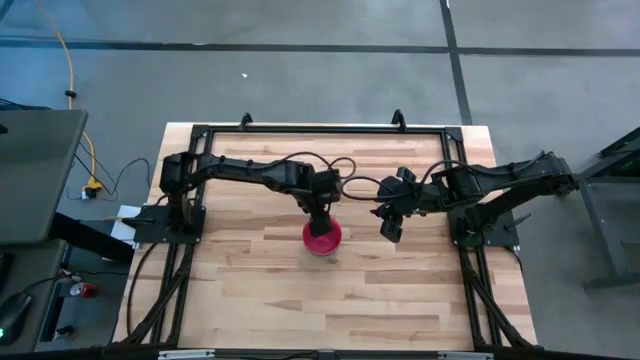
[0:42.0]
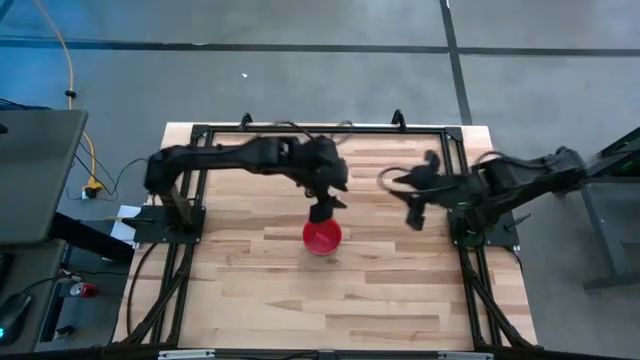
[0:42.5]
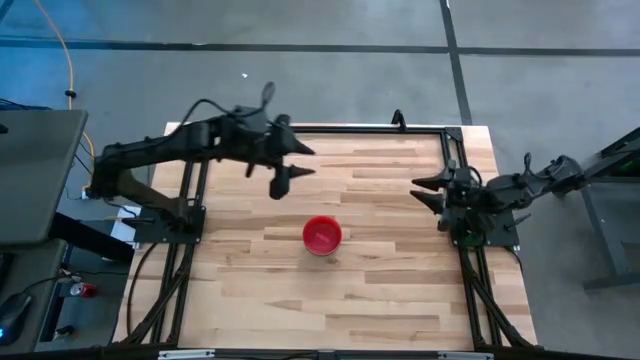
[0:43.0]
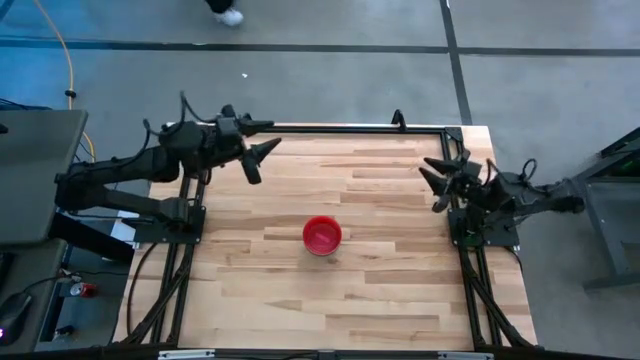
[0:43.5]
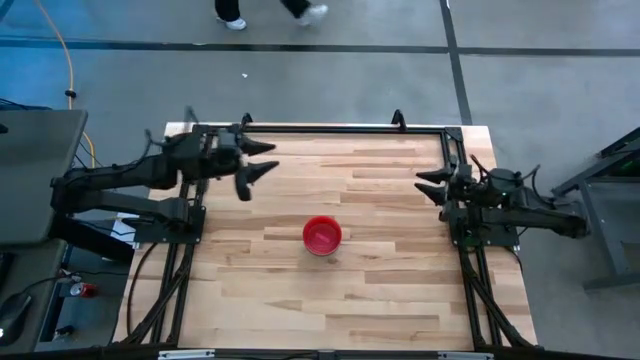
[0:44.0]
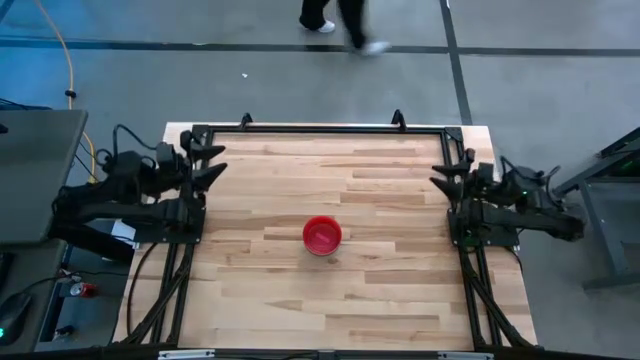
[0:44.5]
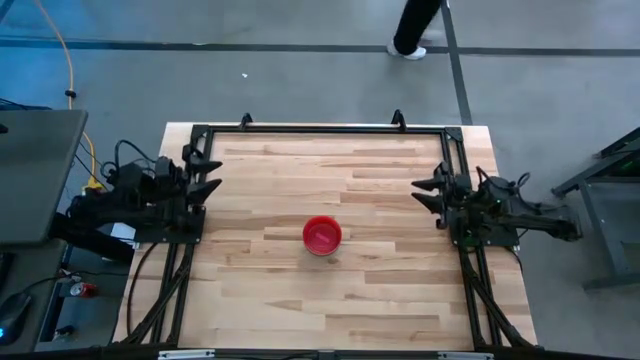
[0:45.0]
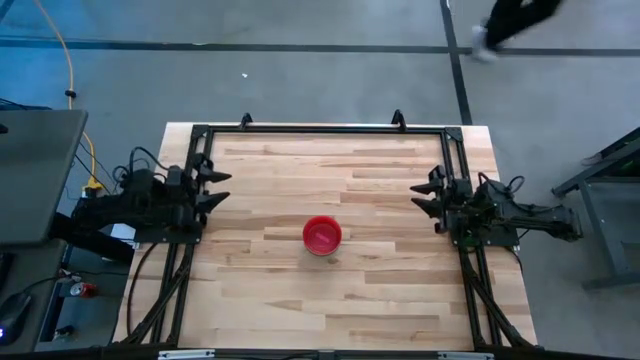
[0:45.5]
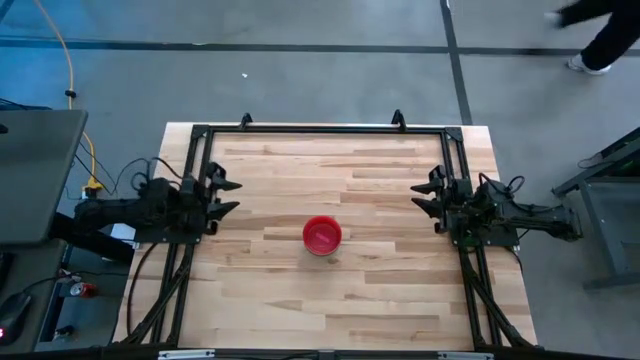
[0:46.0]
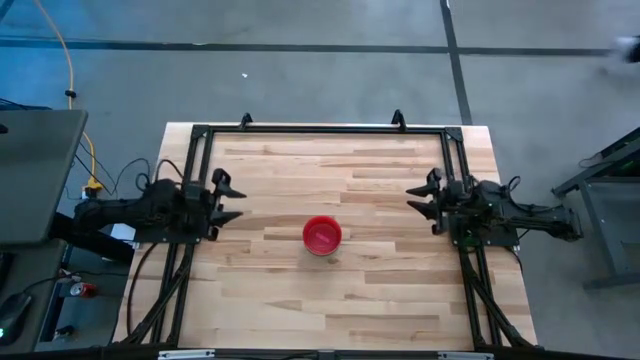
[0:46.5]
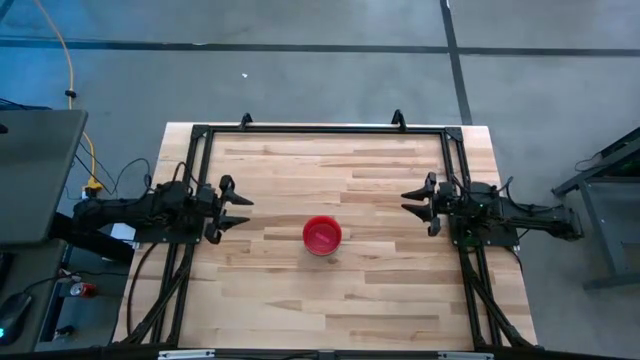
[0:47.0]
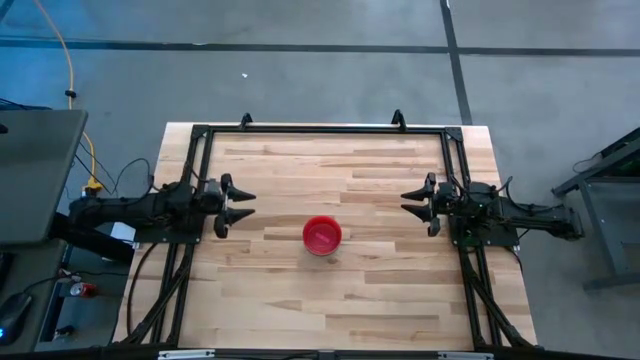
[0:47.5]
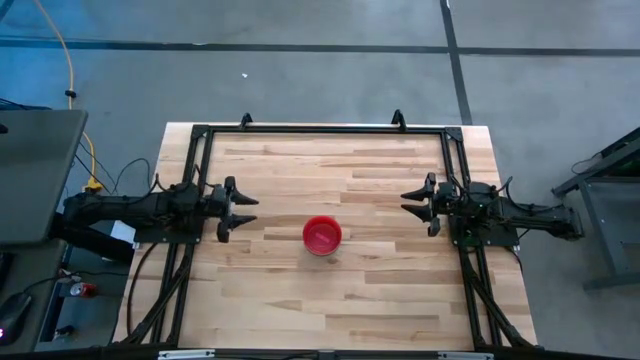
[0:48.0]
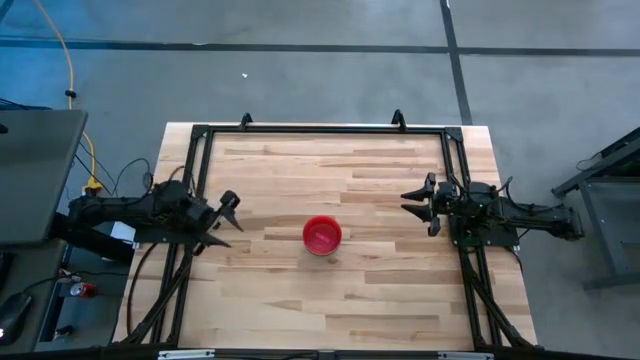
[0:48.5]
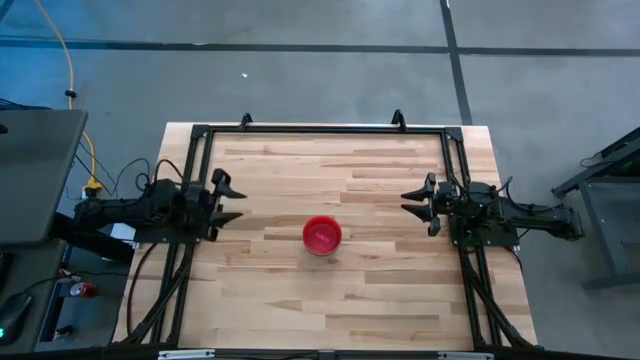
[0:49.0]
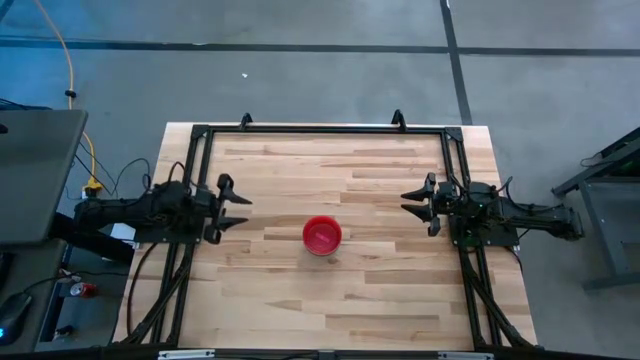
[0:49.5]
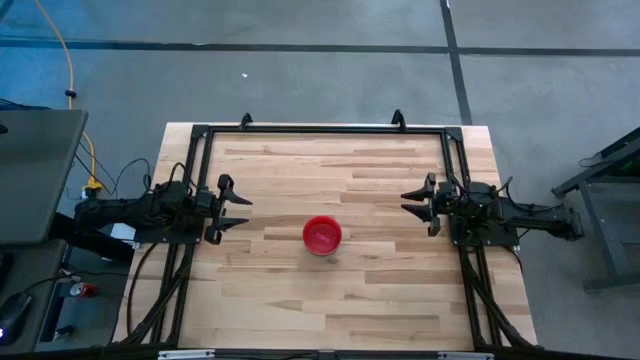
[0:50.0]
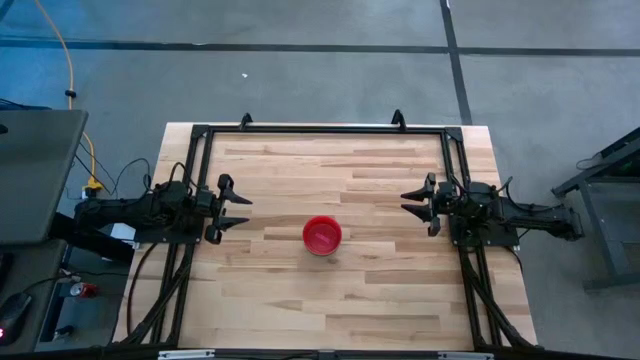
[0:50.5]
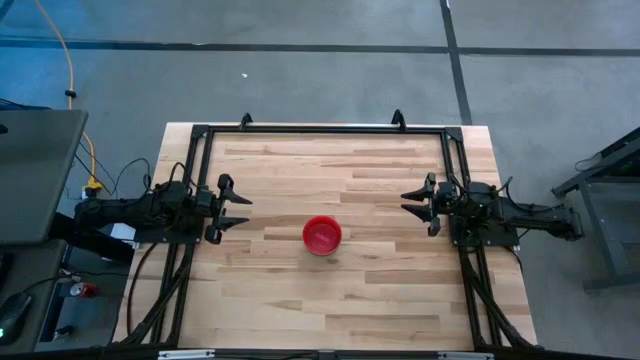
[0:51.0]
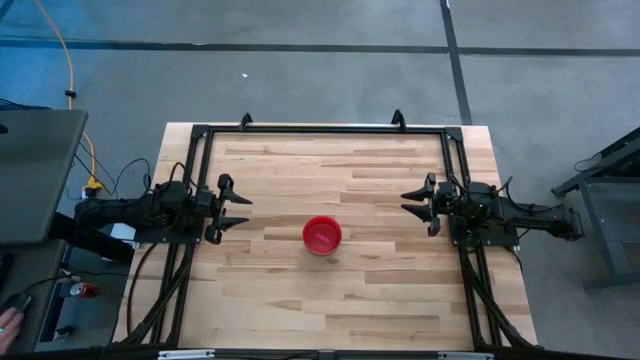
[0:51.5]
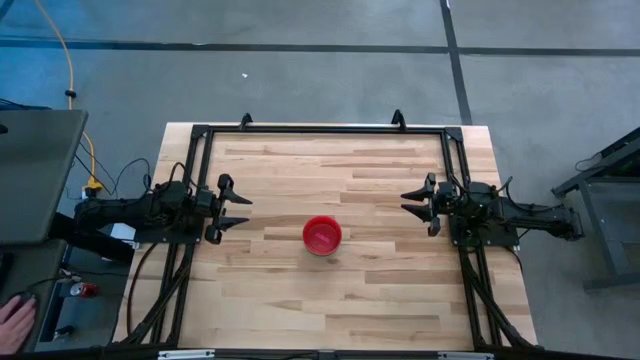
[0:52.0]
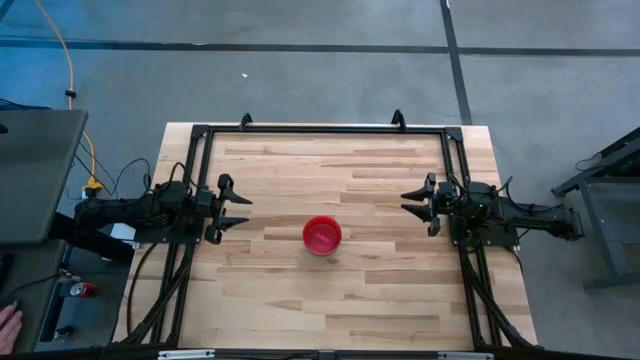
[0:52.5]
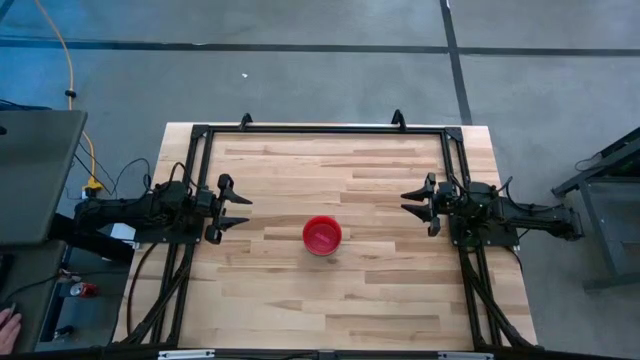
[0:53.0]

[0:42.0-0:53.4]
Task: Nest bowls inside each other
Return to Home Position

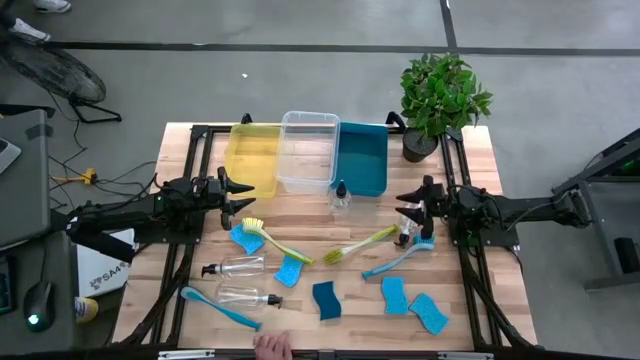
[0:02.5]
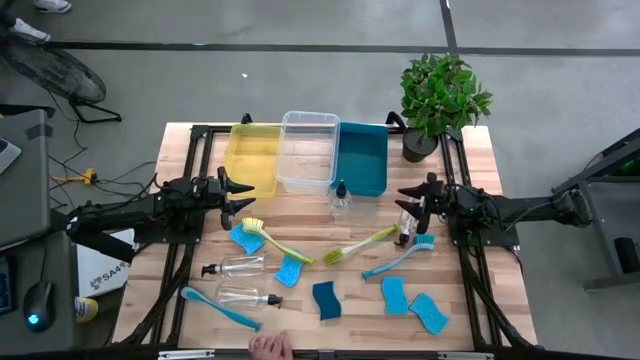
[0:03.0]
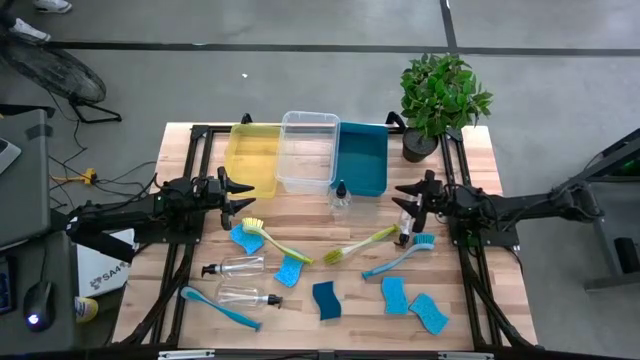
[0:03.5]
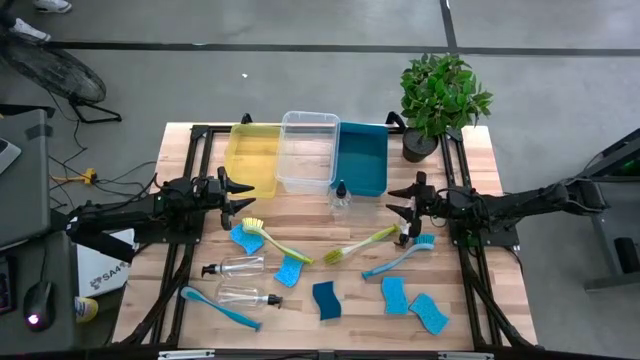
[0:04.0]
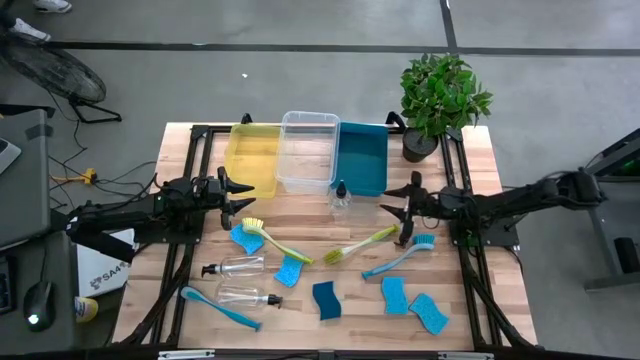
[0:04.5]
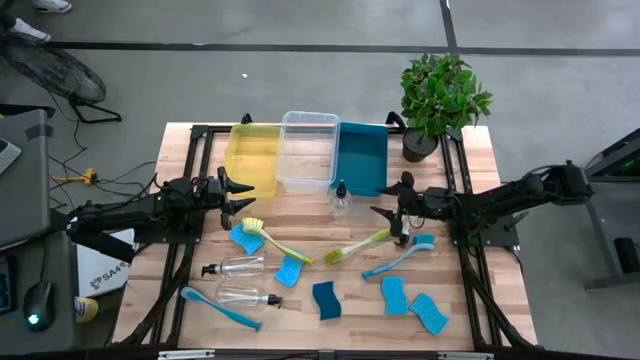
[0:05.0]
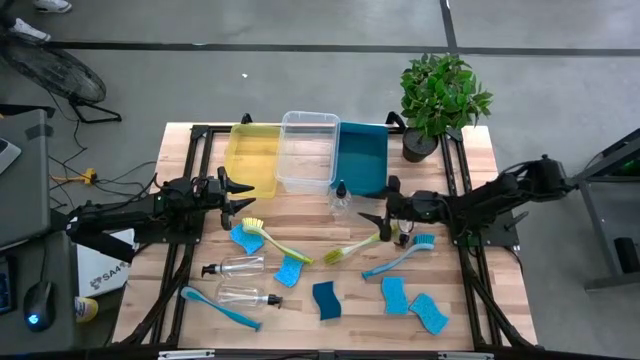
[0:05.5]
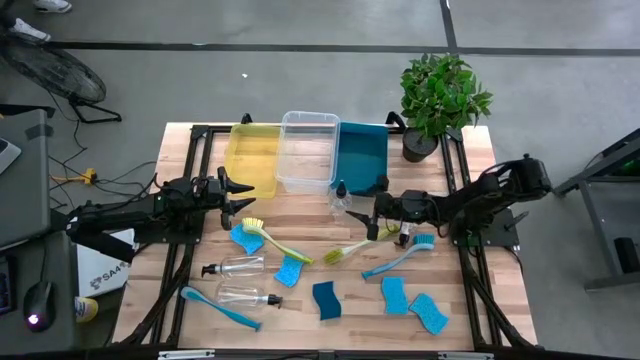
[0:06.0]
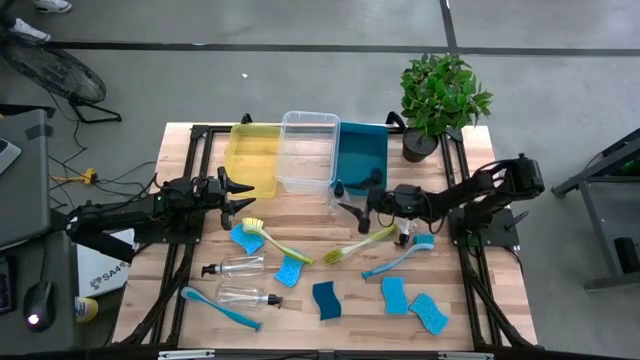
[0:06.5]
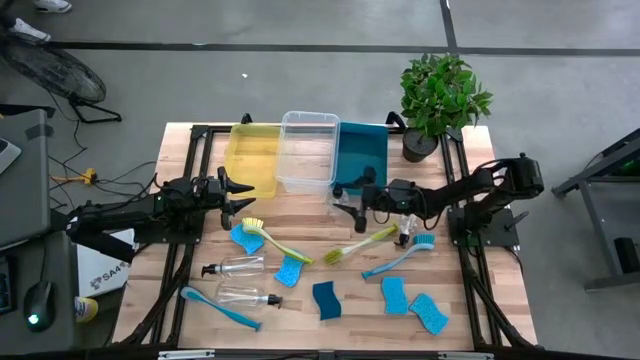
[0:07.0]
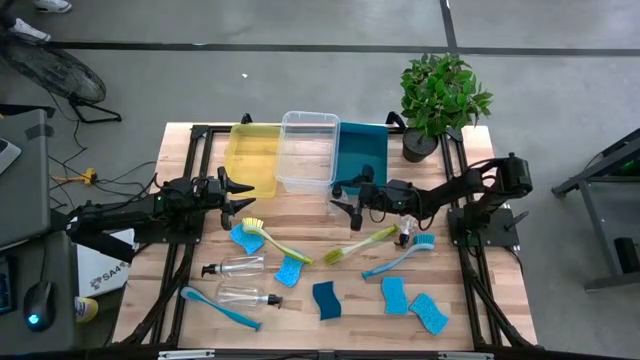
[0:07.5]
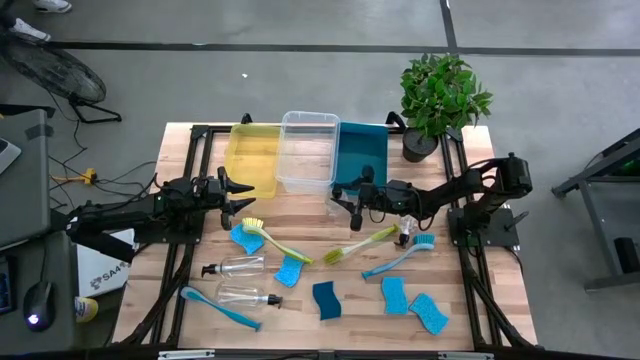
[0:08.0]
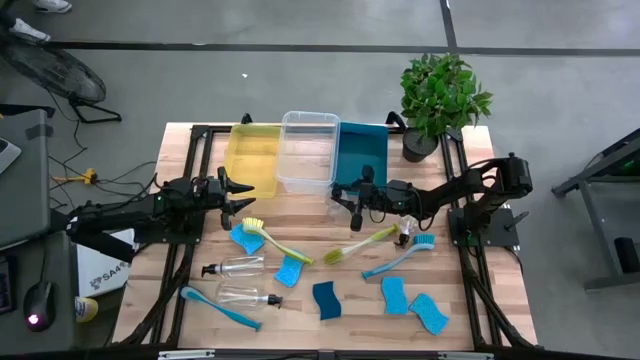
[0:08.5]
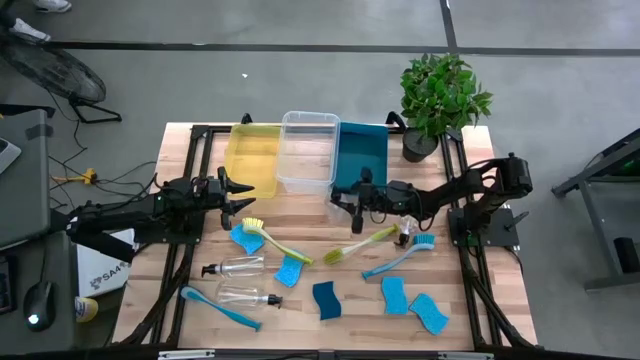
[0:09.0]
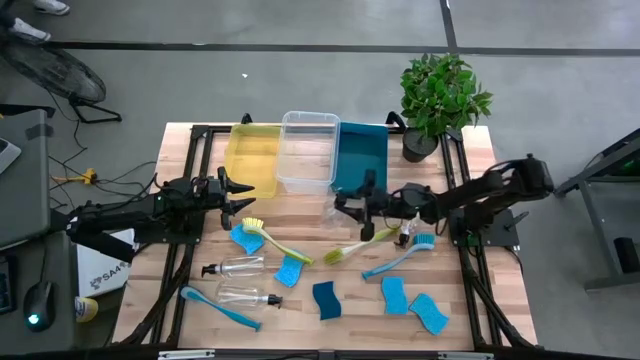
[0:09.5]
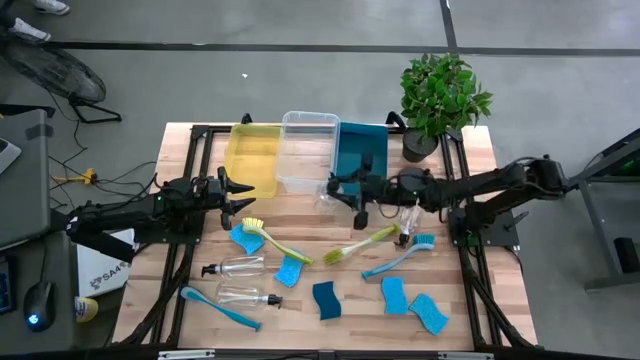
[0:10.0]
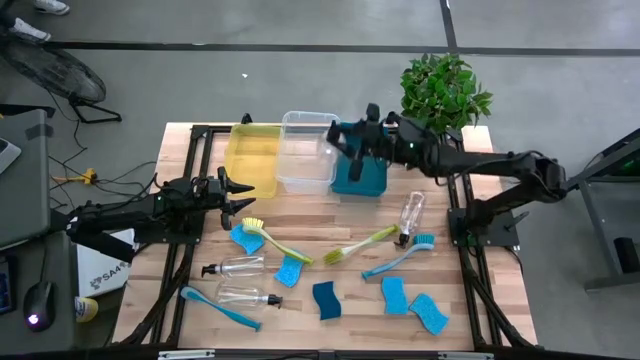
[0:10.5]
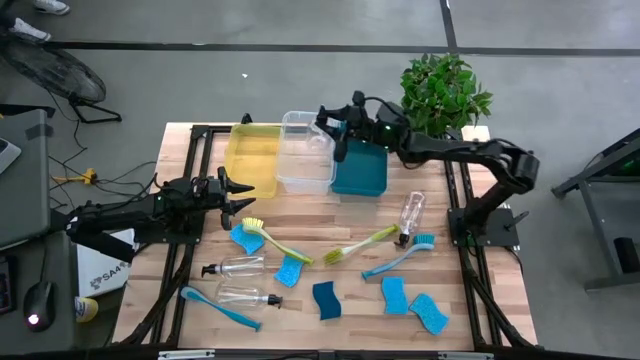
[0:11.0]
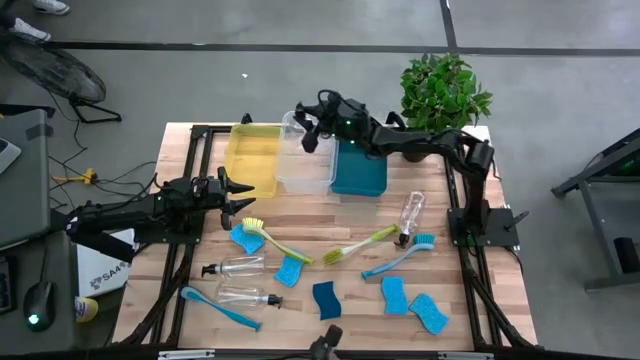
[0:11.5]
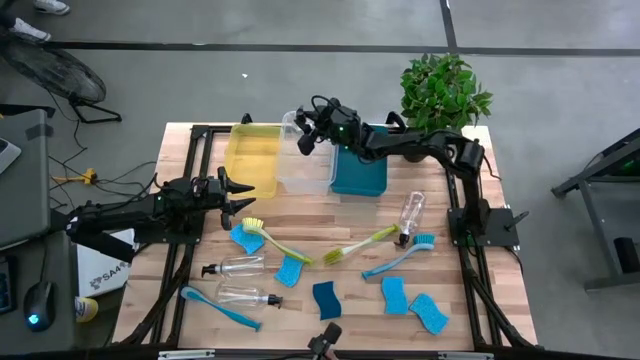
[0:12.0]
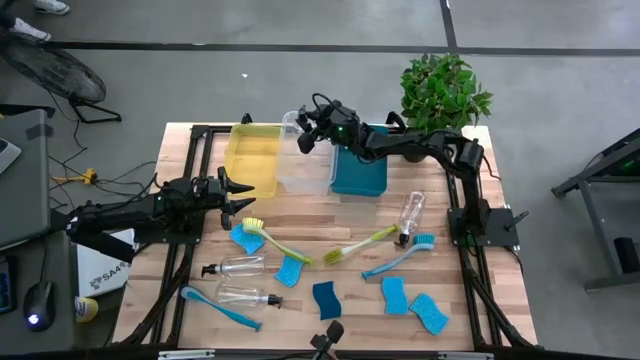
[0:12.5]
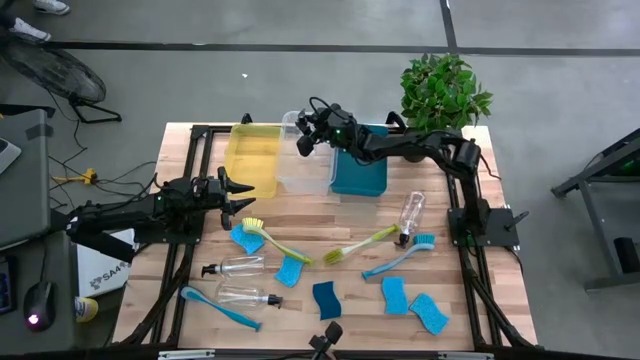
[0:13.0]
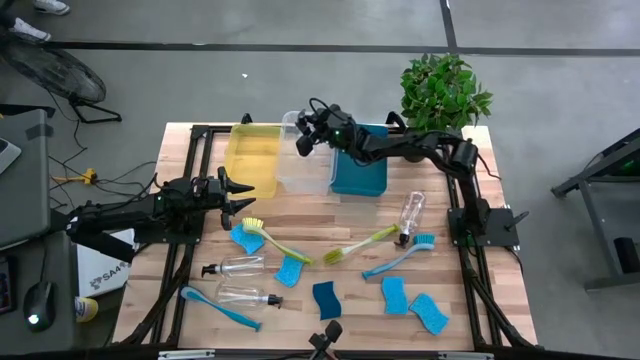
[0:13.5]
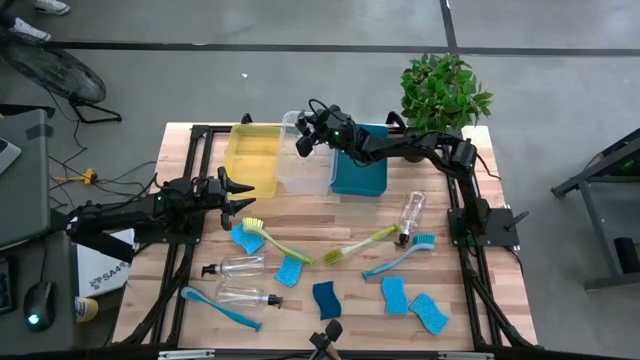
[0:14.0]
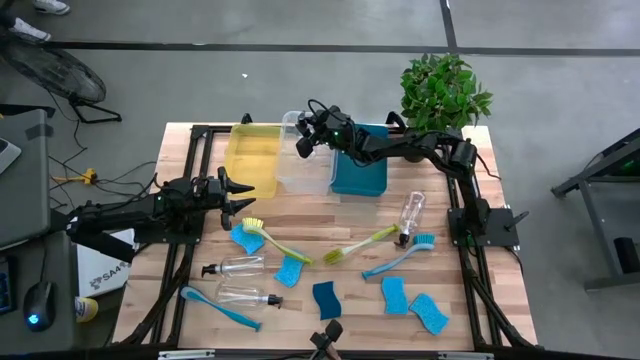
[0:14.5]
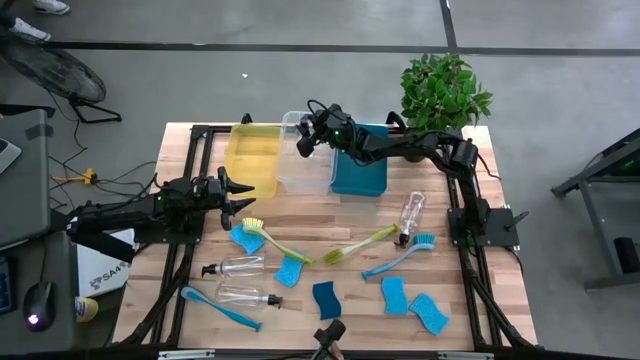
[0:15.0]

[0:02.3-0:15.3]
Task: Pick & Place Kitchen Sink Supplies
Put the transparent dishwashing bottle into the transparent bin
